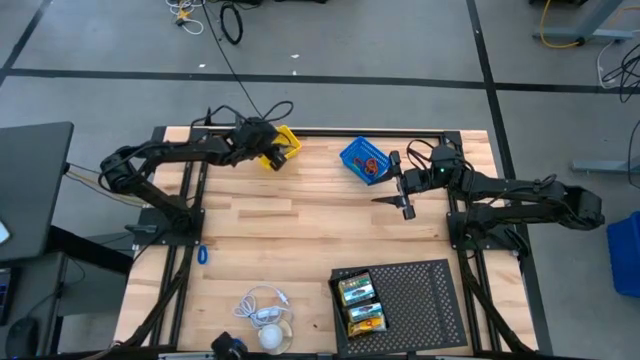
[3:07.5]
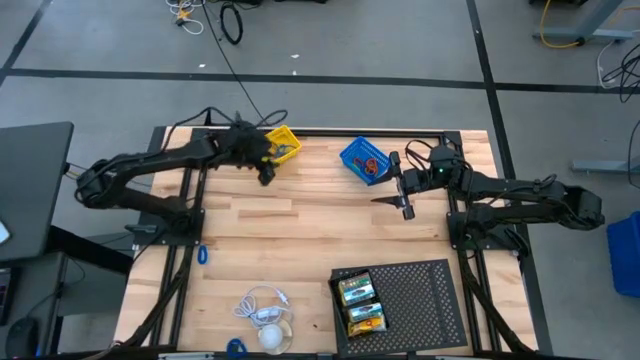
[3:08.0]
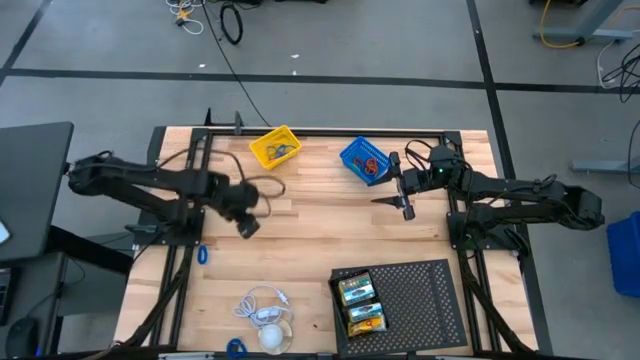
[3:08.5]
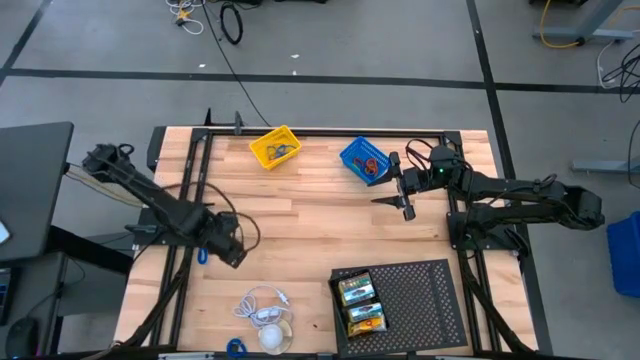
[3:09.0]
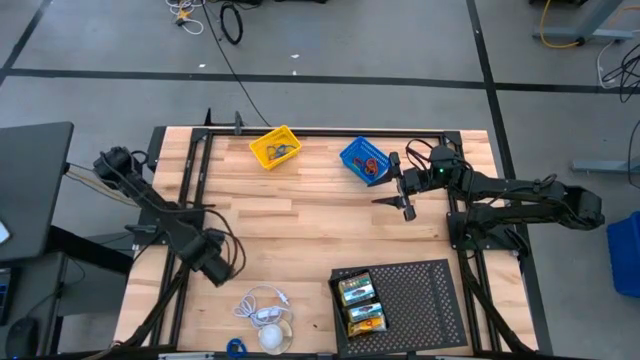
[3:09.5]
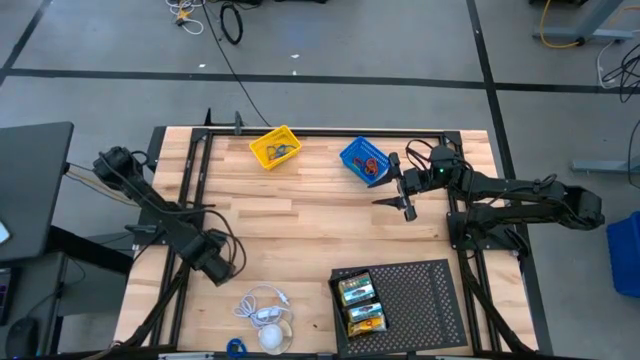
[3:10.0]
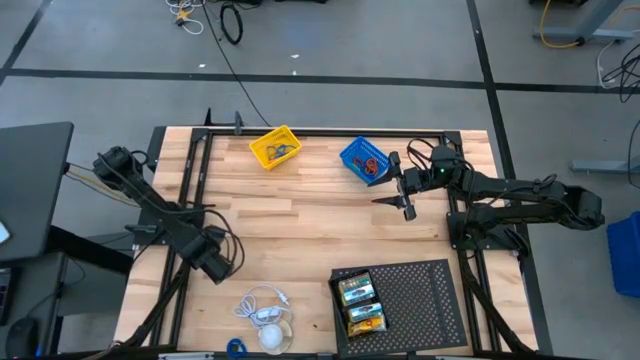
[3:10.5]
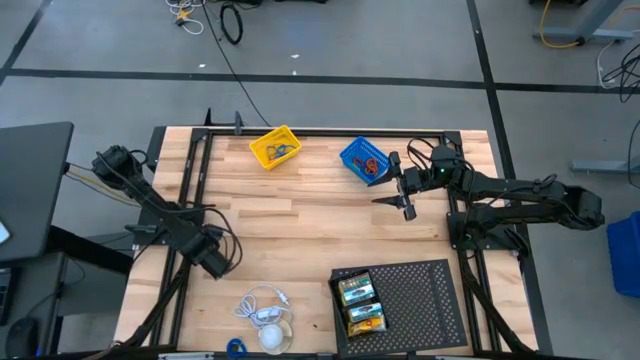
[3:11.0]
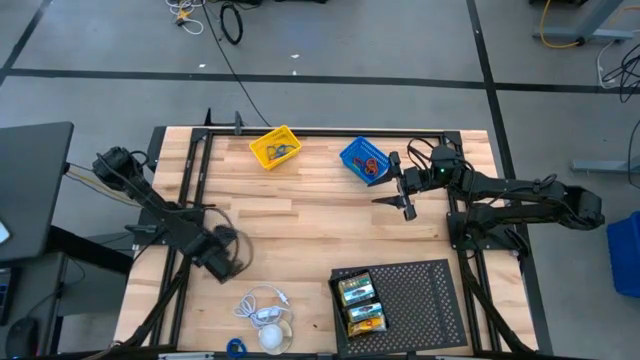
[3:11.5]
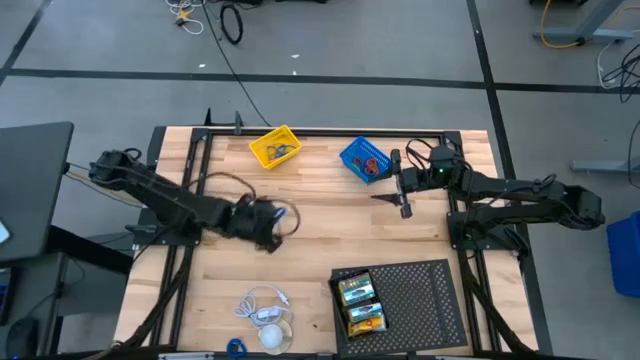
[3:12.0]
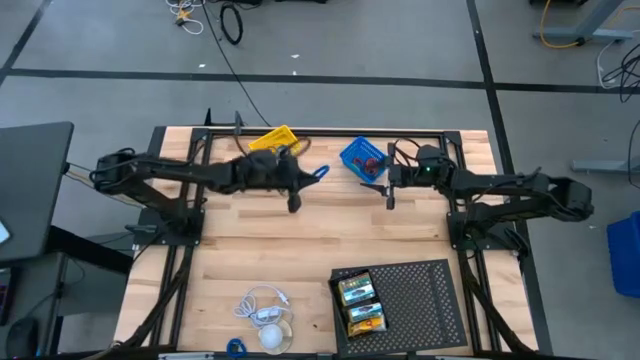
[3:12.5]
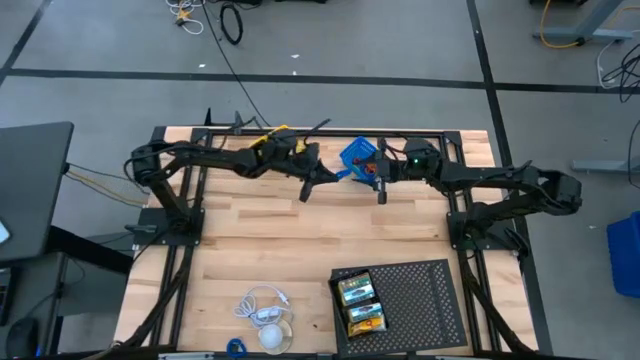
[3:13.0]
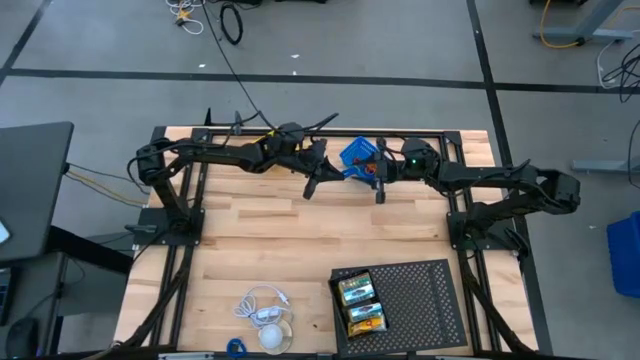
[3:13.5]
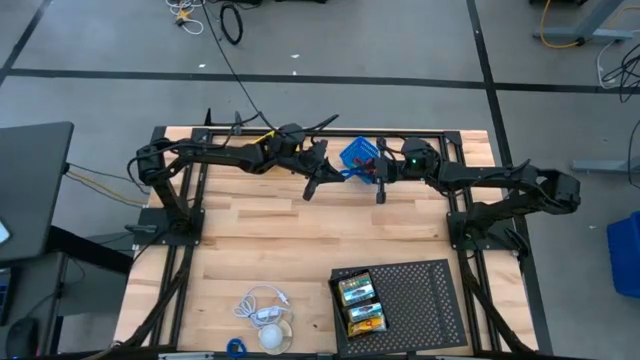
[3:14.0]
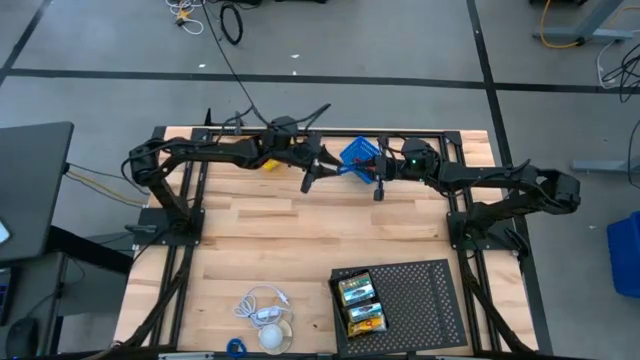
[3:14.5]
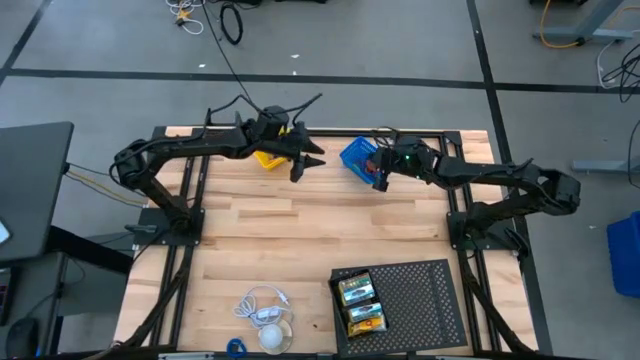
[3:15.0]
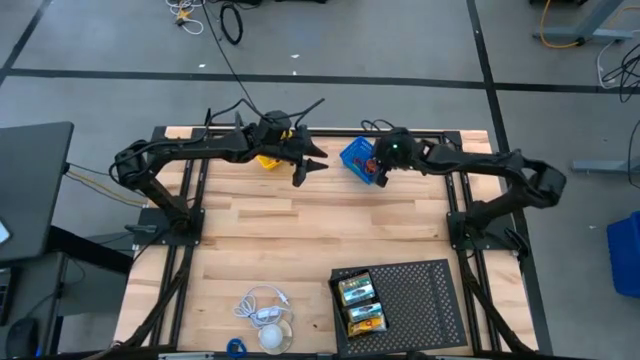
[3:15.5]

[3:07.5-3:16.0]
Task: Pick & Place Office Desk Supplies
Put the blue spring keychain into the blue basket

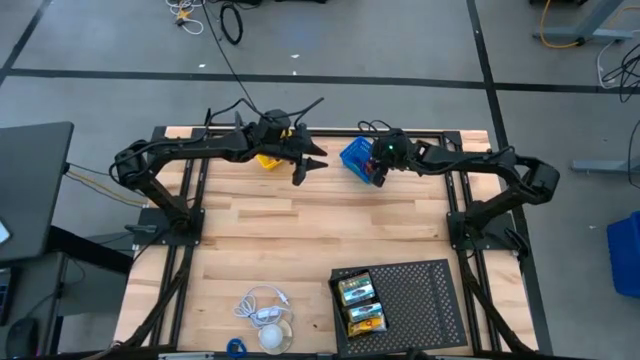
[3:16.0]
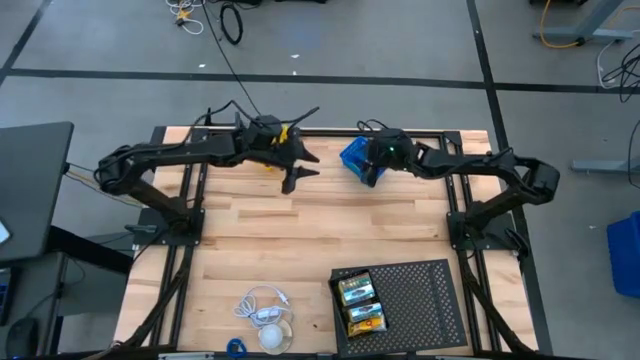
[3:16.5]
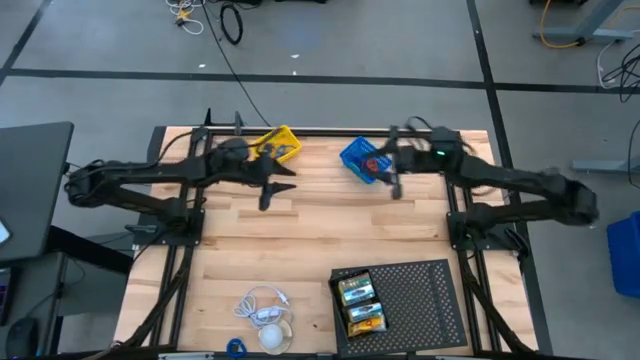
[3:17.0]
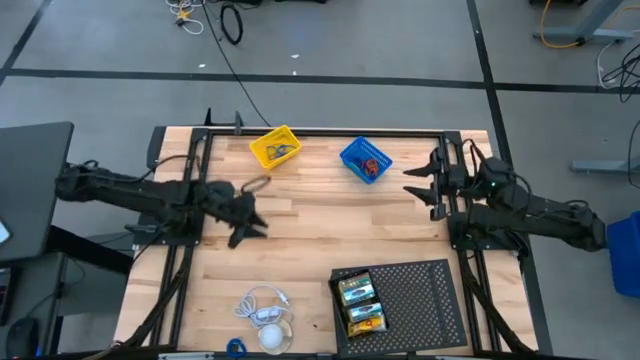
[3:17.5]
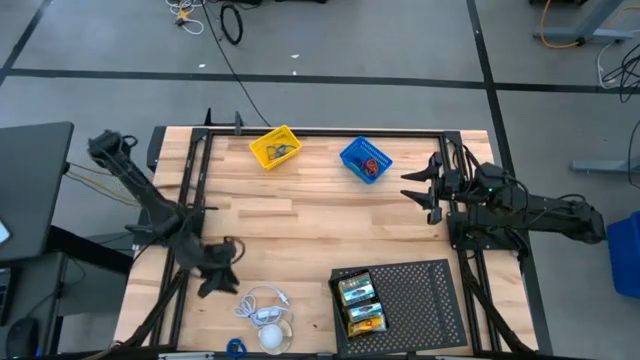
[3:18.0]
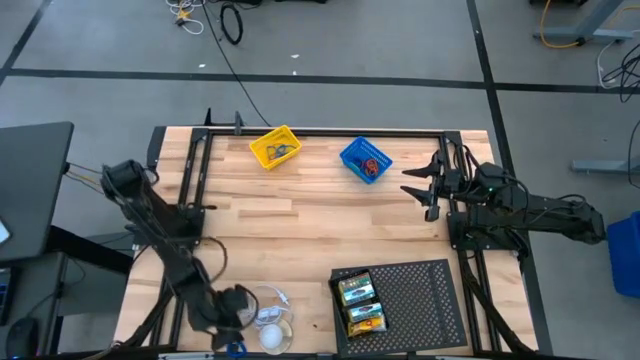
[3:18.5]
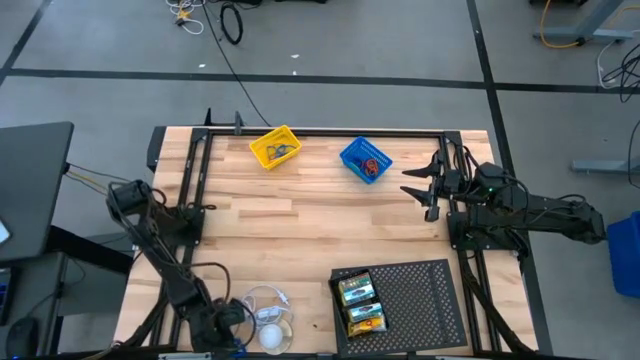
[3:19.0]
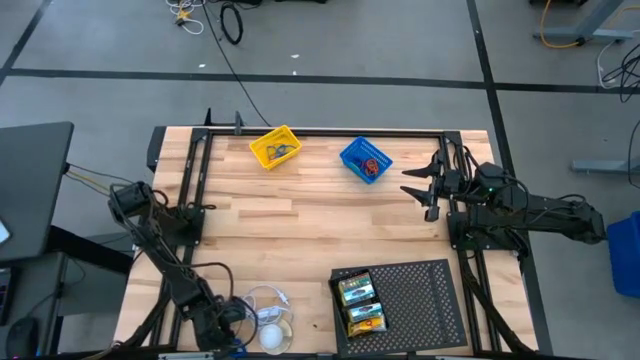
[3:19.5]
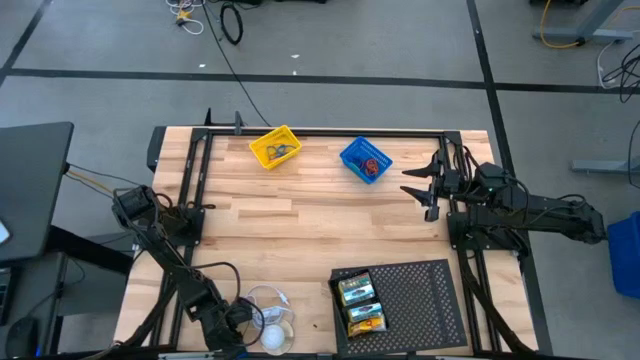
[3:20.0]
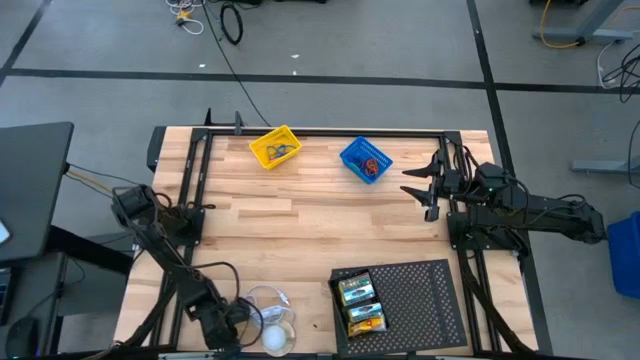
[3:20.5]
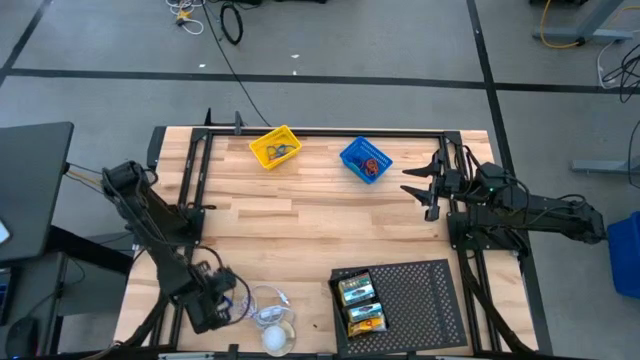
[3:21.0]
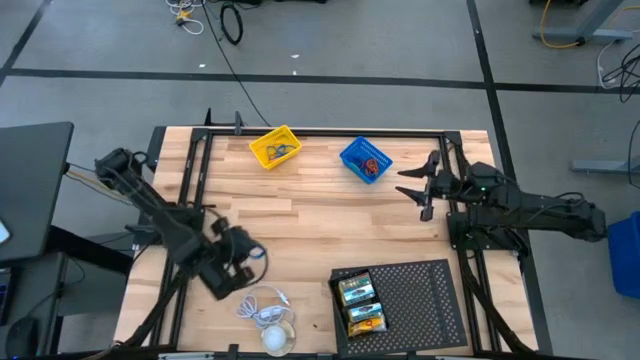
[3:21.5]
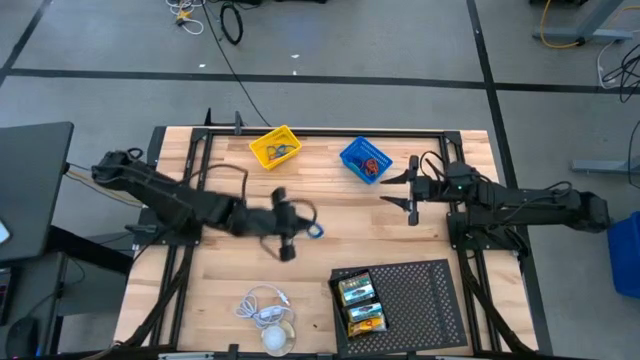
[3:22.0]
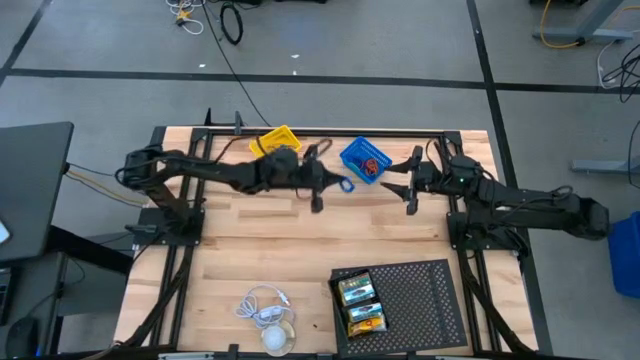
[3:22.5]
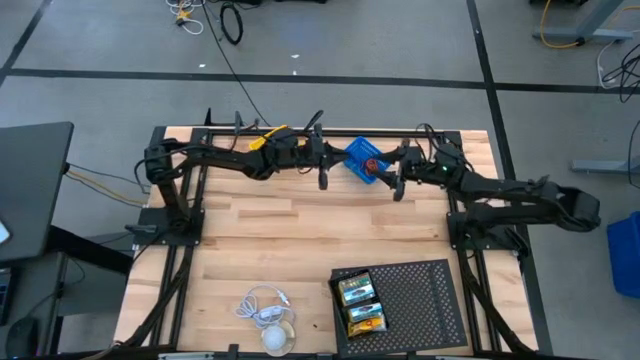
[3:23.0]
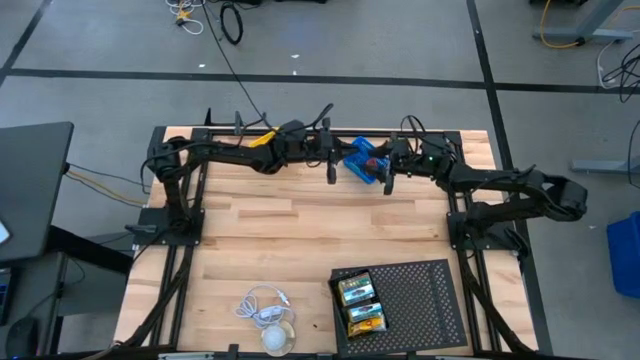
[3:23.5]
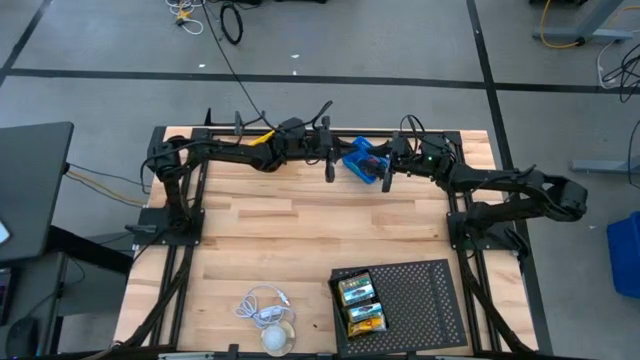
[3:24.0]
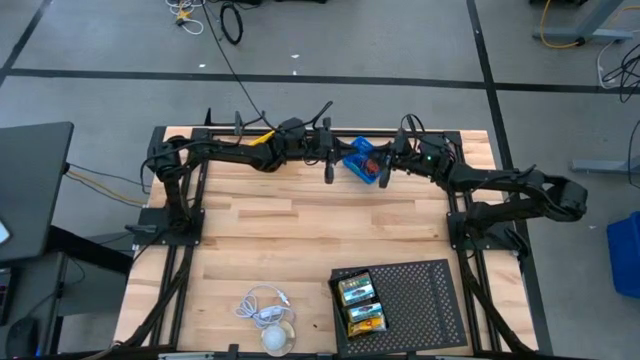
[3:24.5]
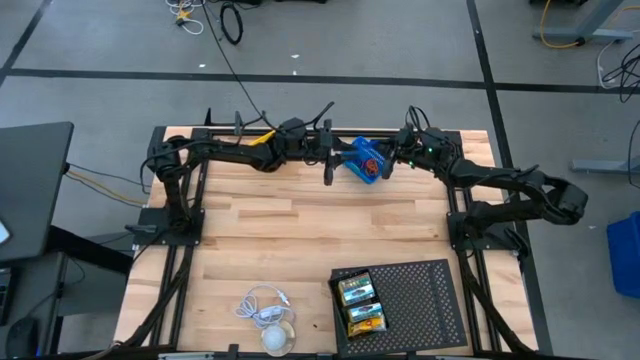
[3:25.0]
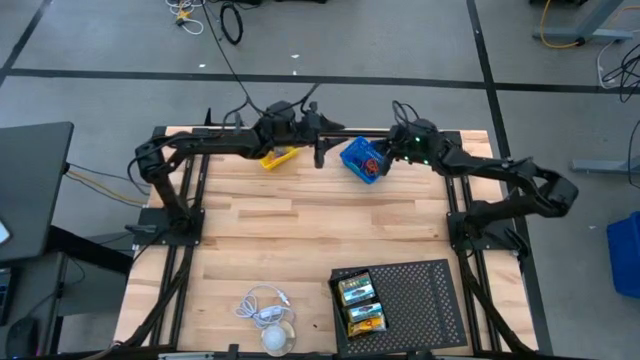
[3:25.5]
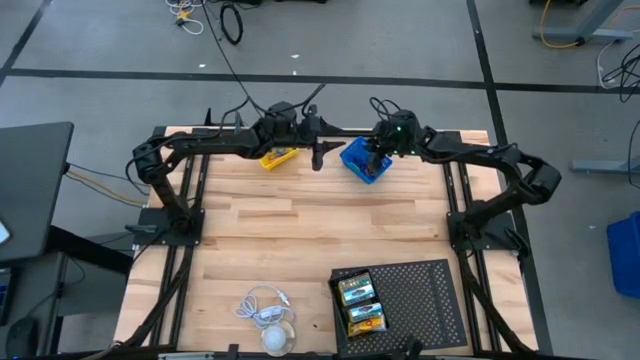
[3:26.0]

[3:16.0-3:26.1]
Put the blue spring keychain into the blue basket

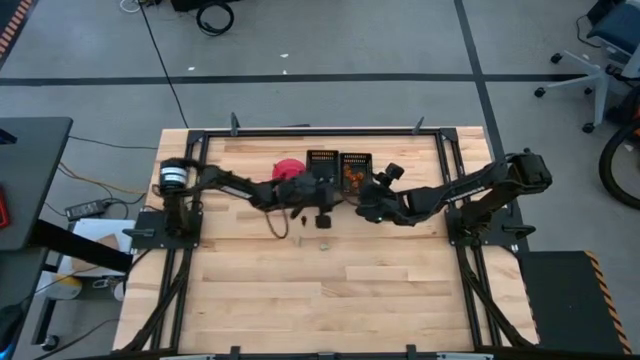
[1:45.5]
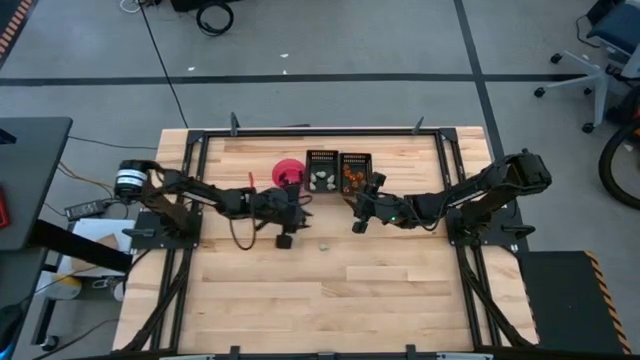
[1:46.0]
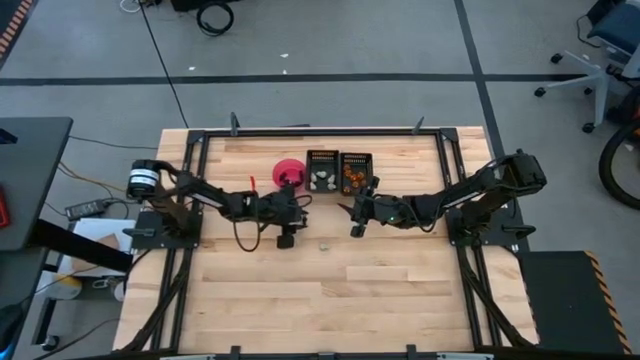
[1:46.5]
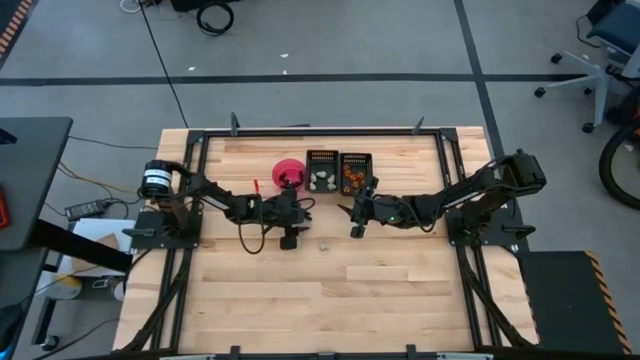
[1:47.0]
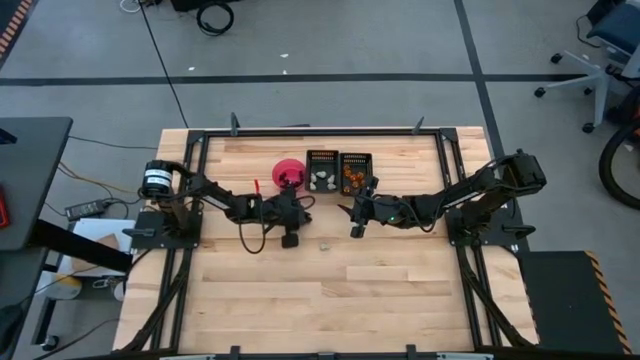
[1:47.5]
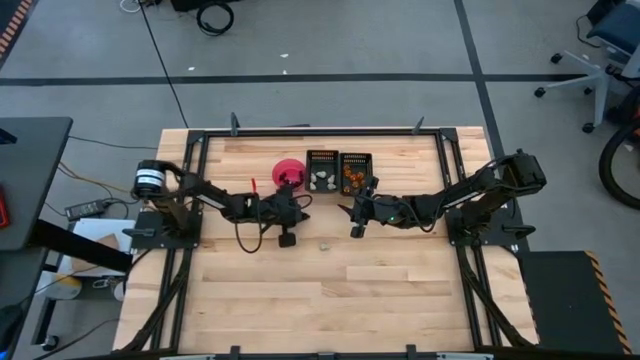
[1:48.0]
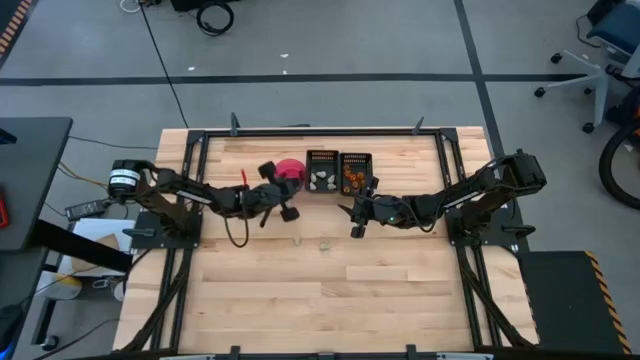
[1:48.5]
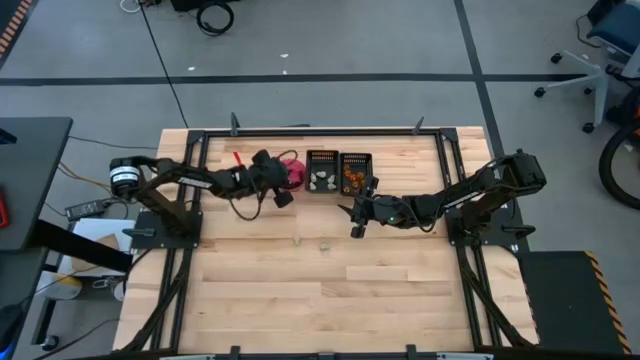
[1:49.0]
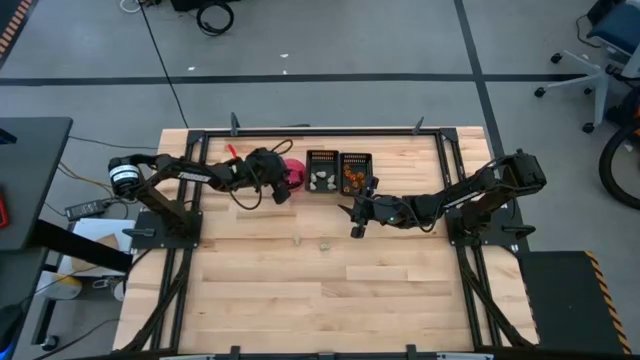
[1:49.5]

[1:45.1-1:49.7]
Task: Sort Halloween decoration
Put the black skeleton toy into the red bowl
